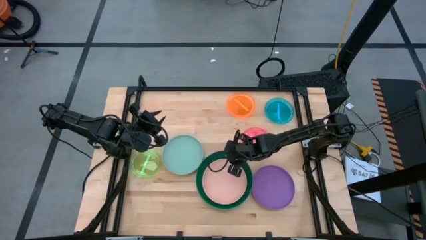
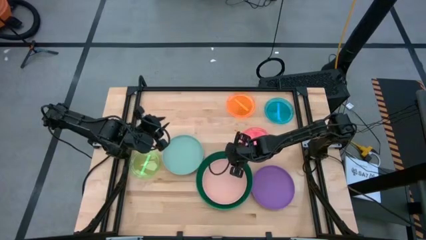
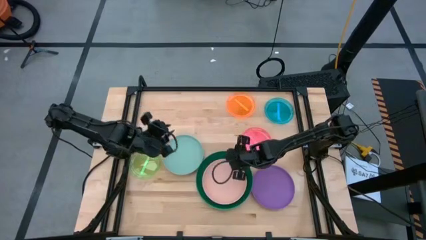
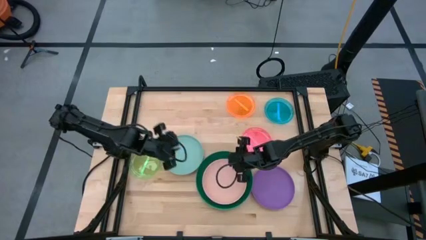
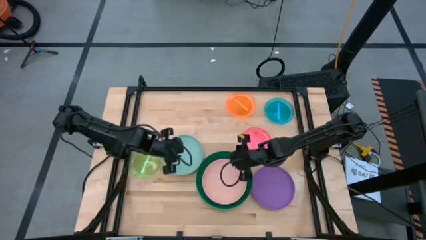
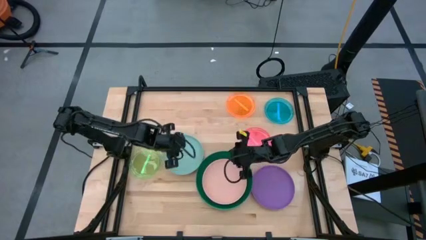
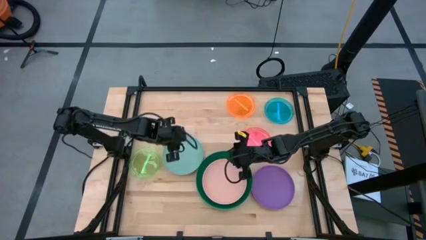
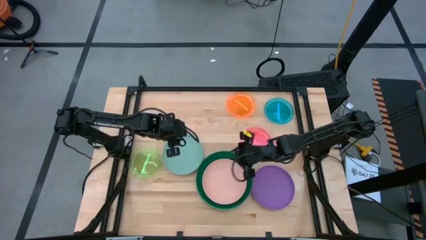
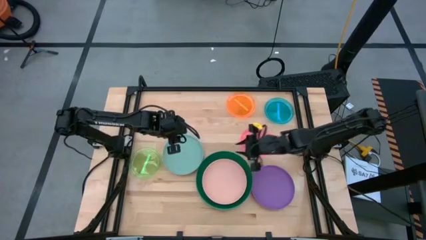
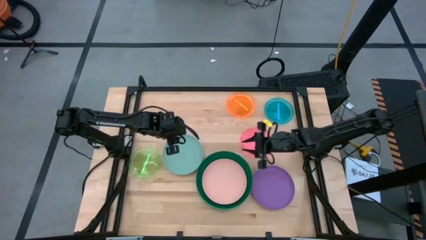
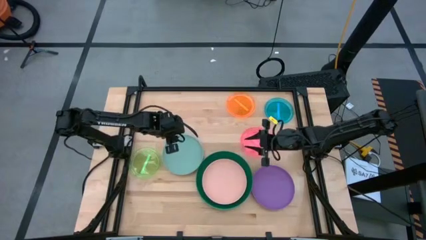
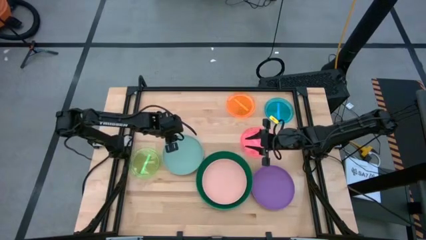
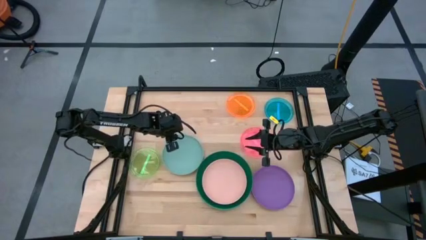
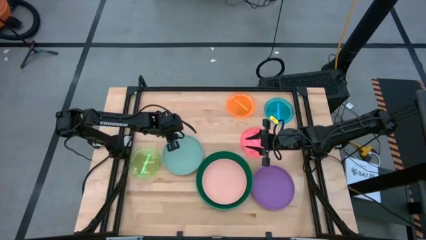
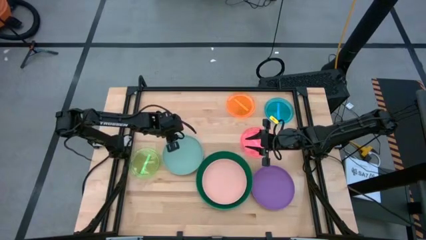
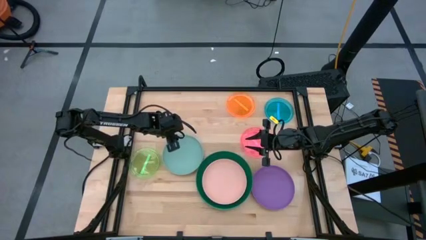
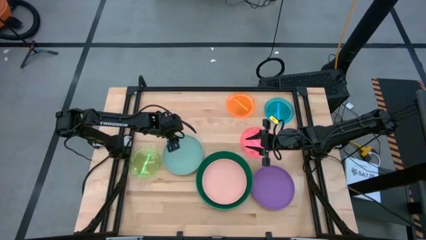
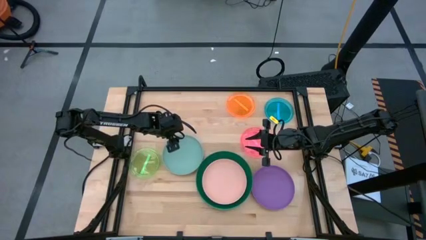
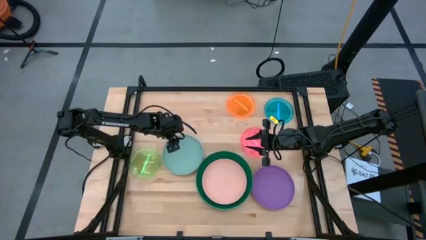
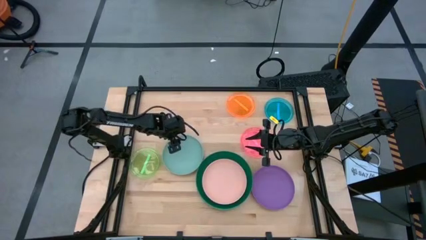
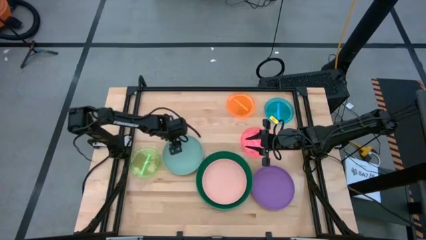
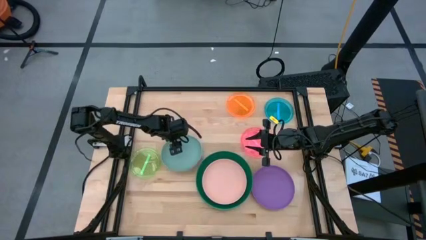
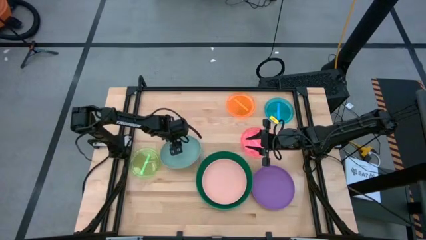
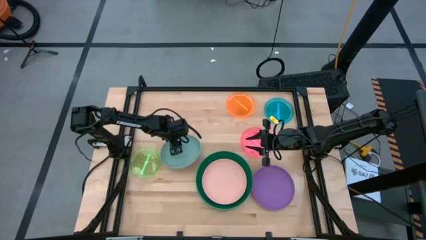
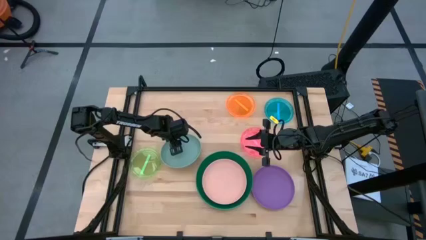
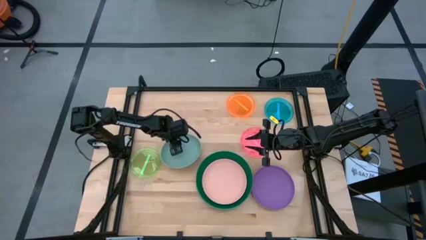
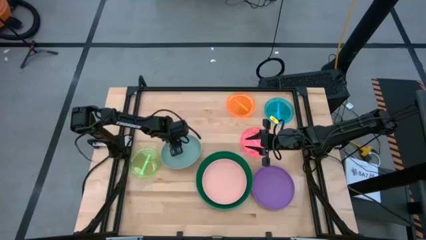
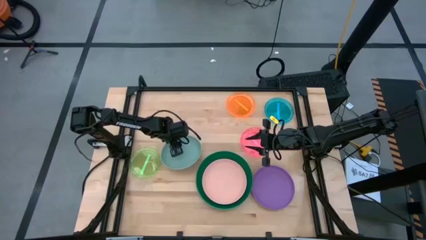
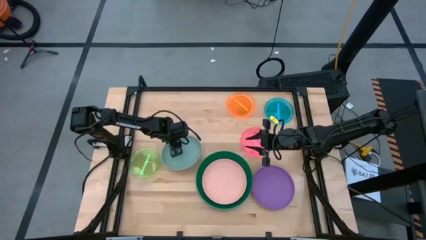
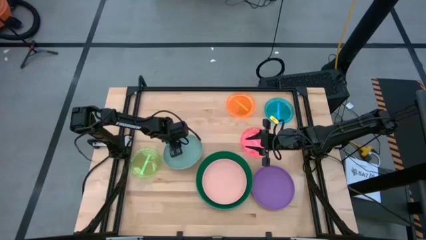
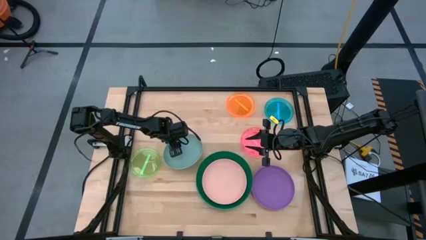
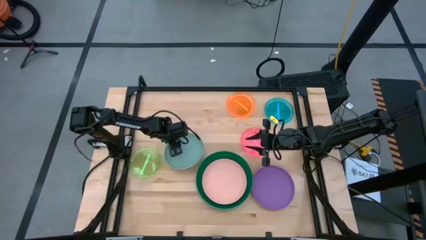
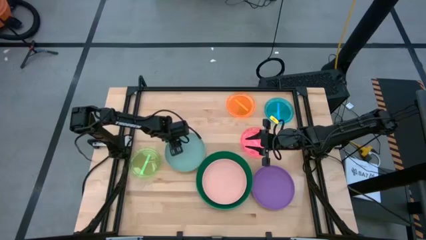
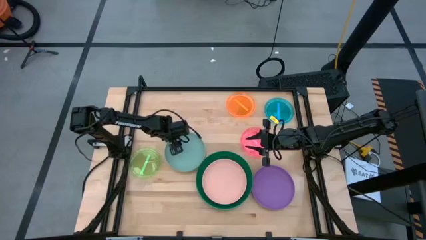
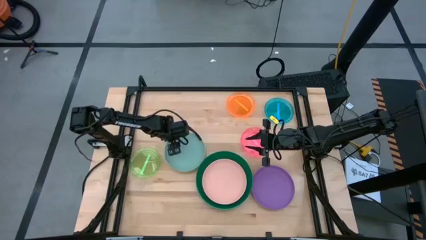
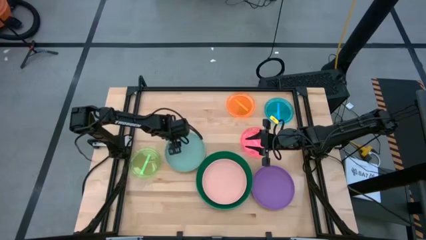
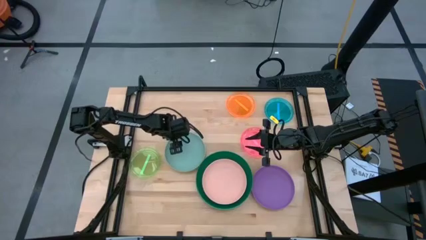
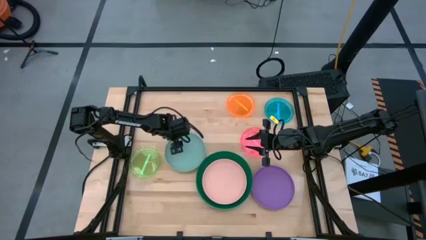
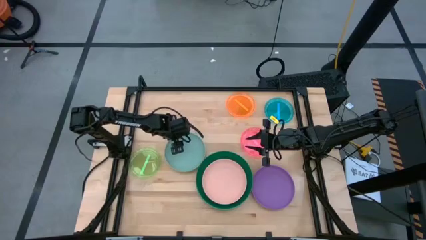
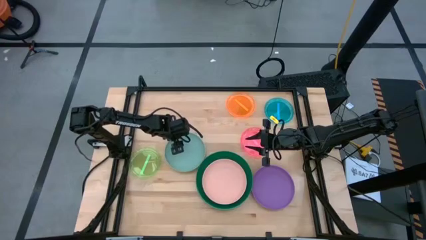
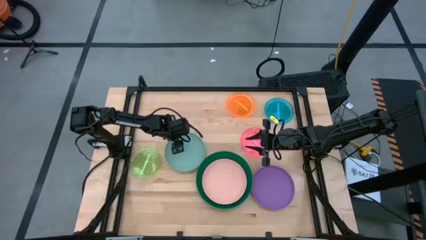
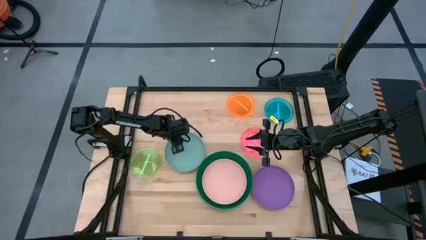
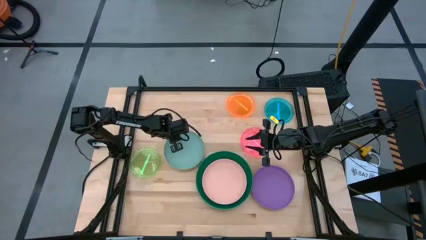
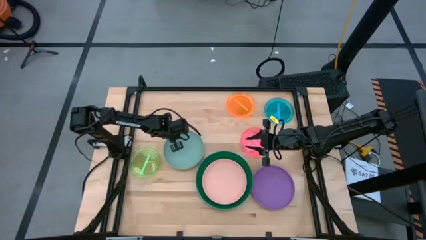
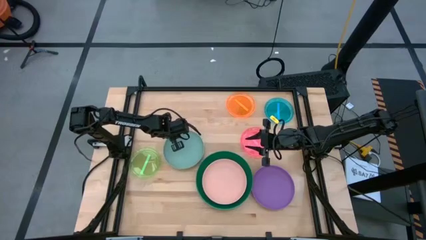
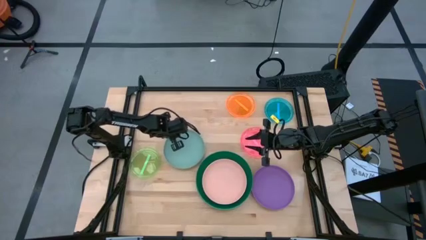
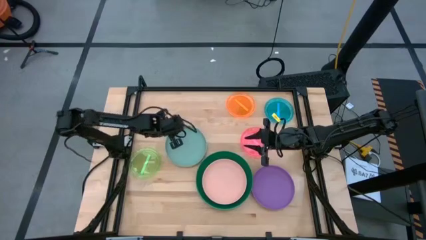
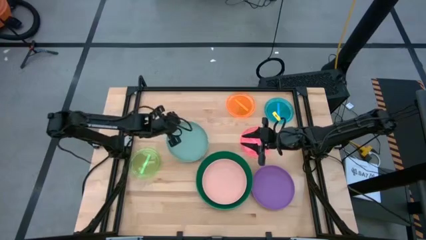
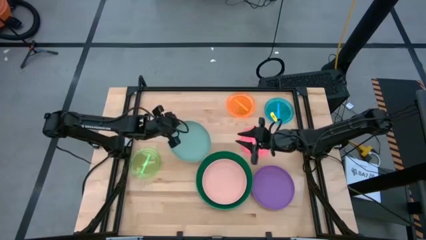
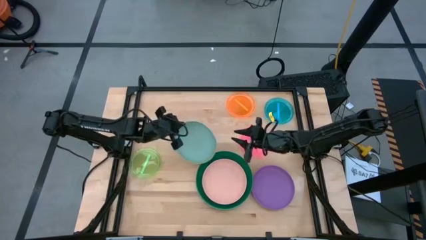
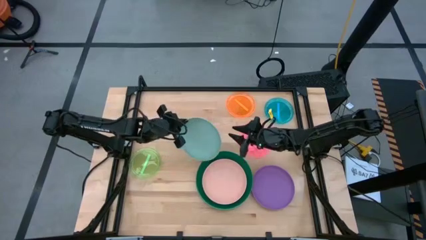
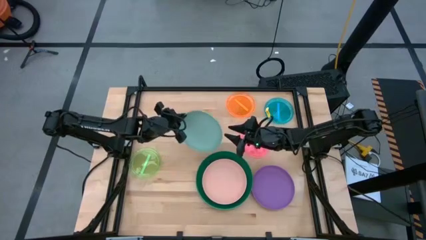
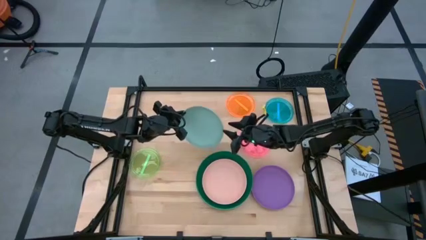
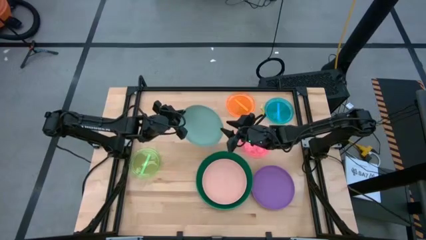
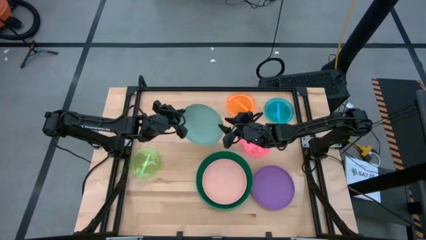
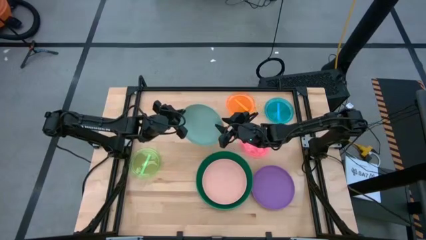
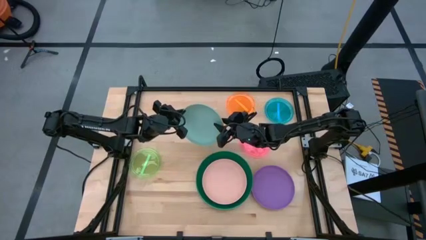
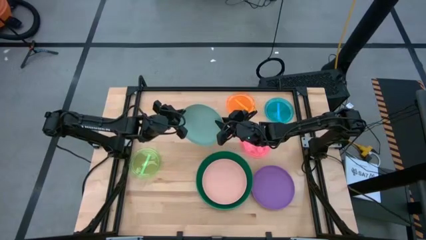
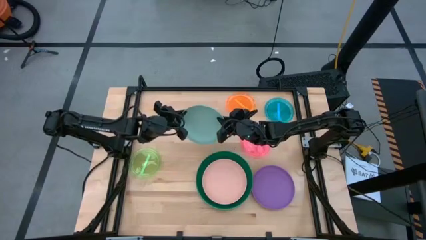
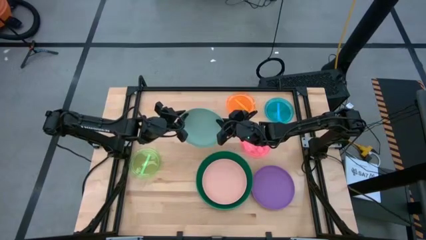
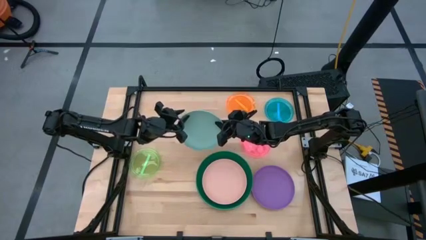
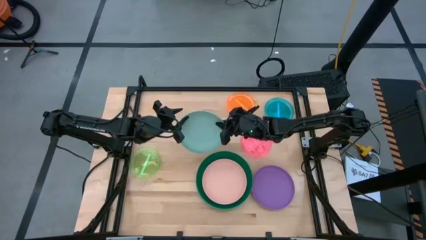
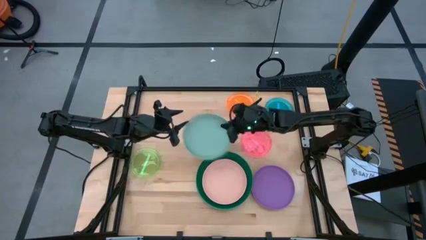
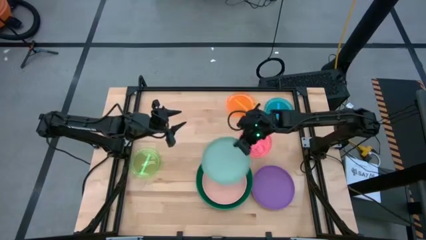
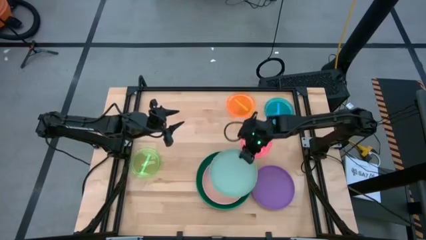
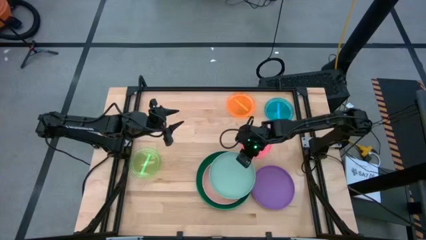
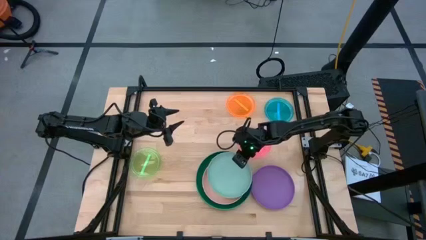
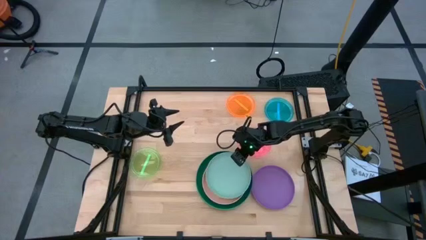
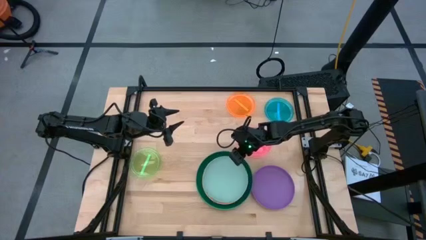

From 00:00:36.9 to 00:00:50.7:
Task: Stack plastic plates
Stack the light blue plate on top of the light pink plate

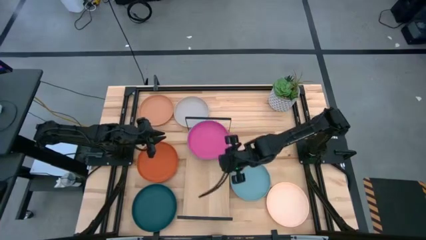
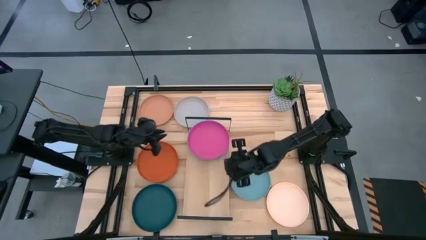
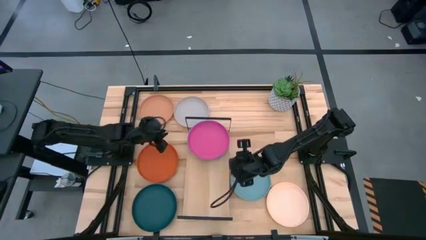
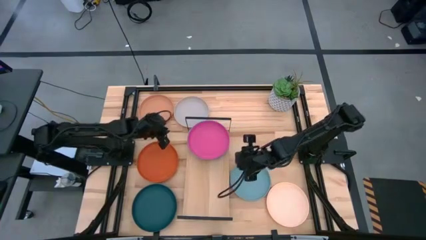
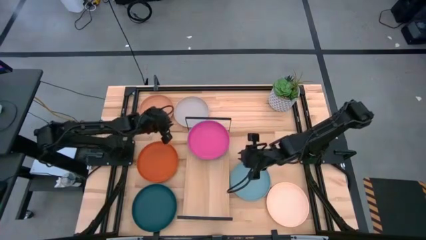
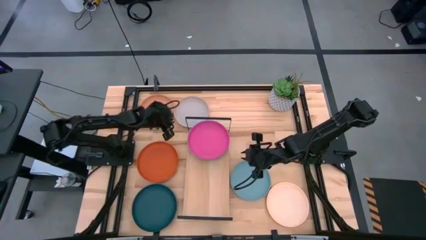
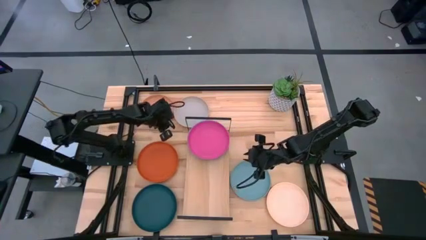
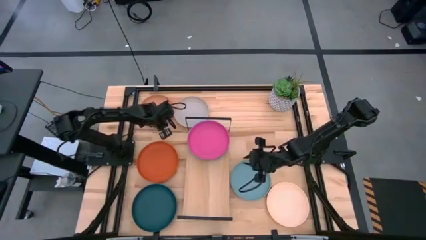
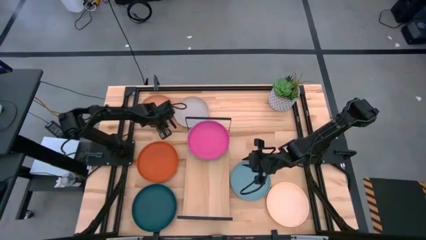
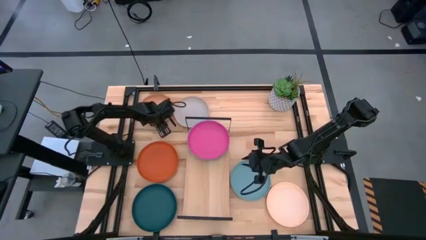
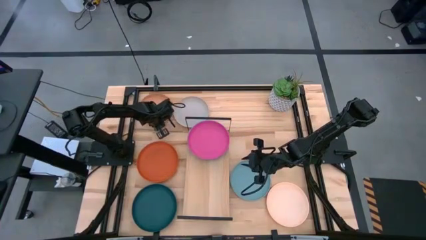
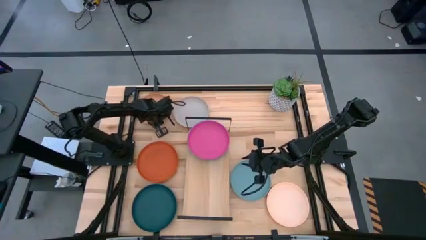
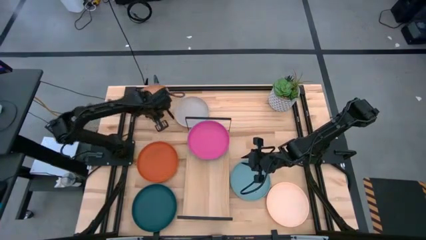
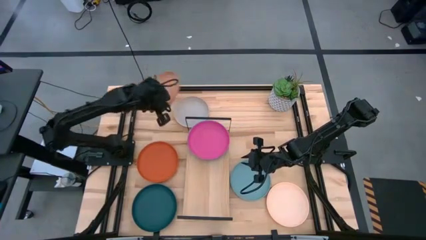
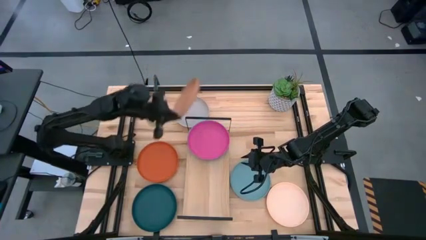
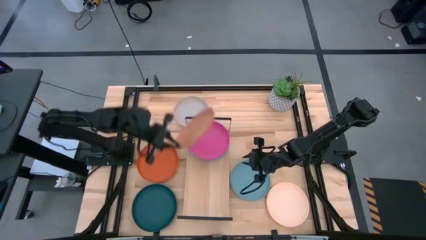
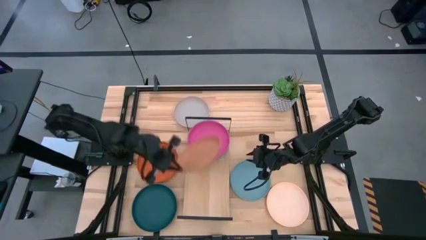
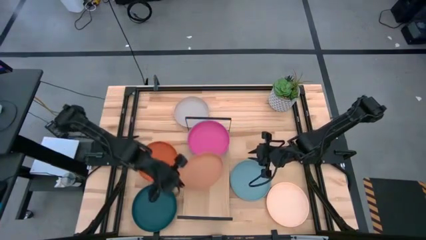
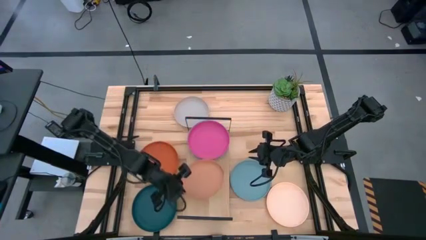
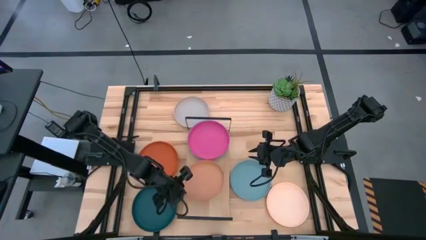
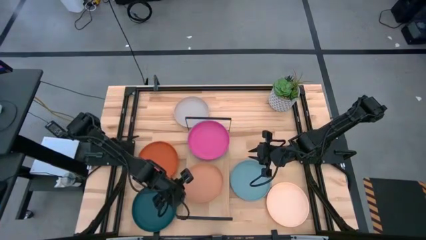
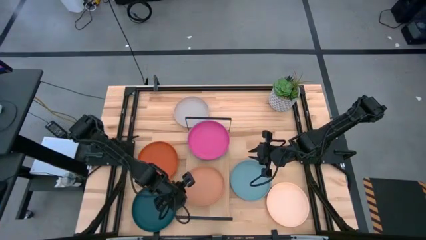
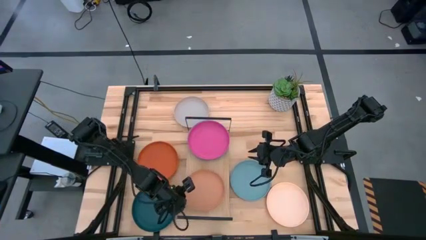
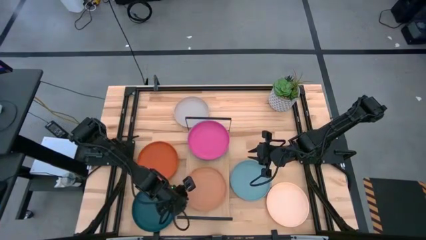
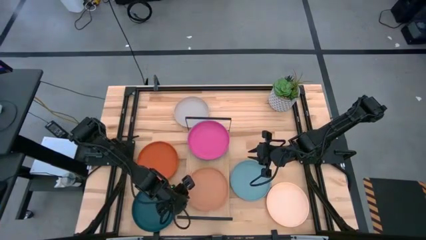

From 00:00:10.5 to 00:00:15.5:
Task: Place and stack plates onto a shelf
Put the light brown plate on the shelf
